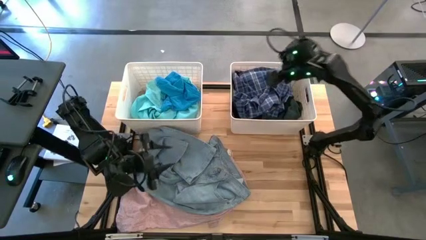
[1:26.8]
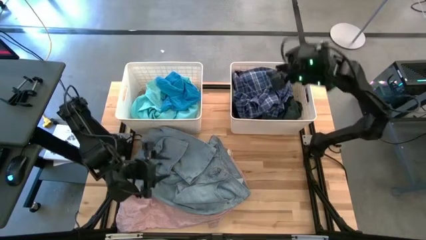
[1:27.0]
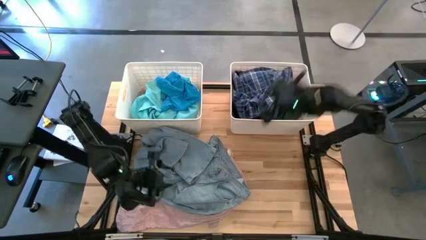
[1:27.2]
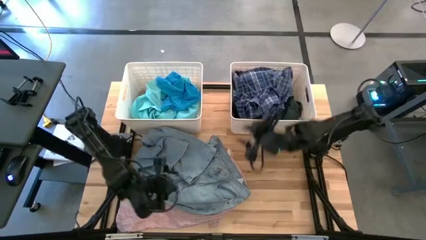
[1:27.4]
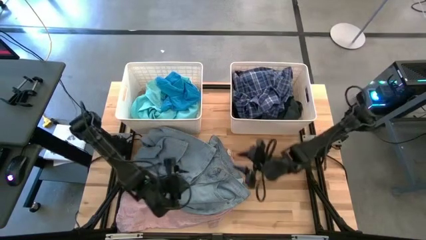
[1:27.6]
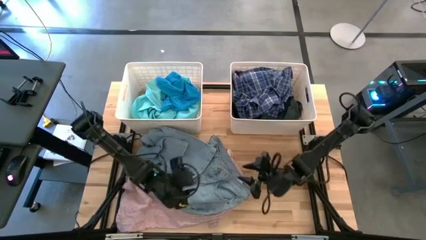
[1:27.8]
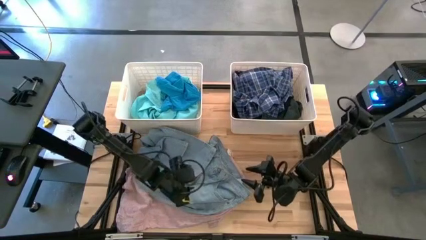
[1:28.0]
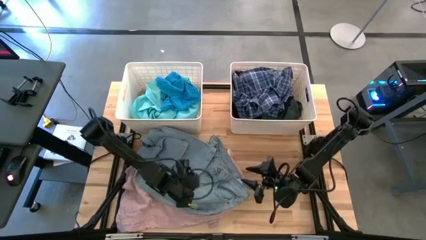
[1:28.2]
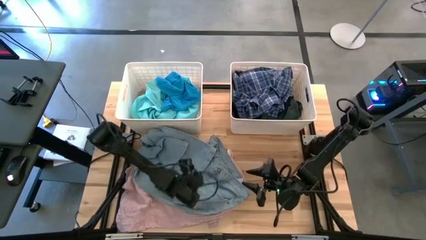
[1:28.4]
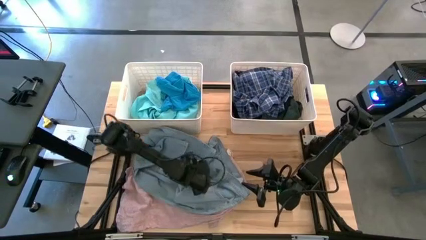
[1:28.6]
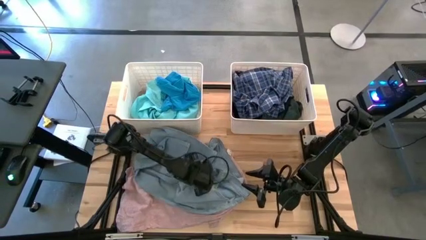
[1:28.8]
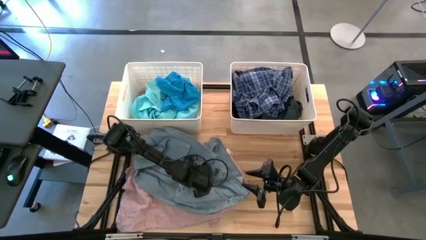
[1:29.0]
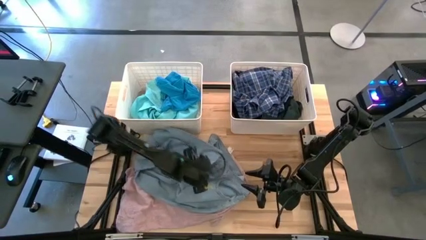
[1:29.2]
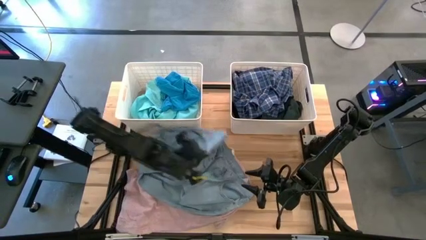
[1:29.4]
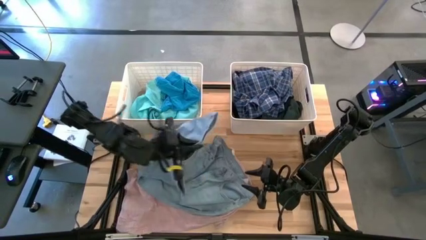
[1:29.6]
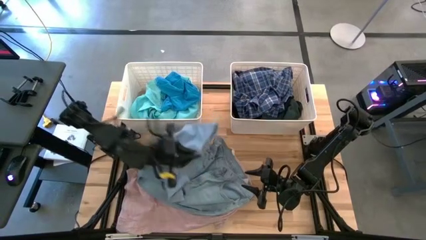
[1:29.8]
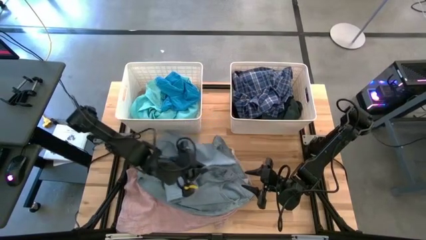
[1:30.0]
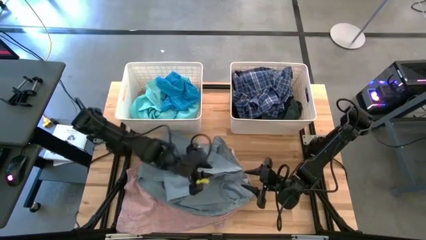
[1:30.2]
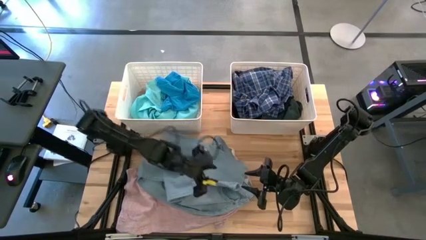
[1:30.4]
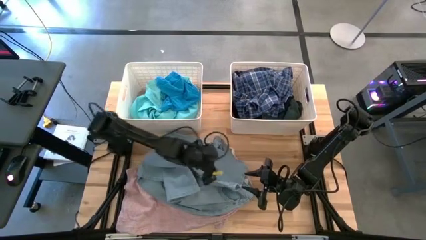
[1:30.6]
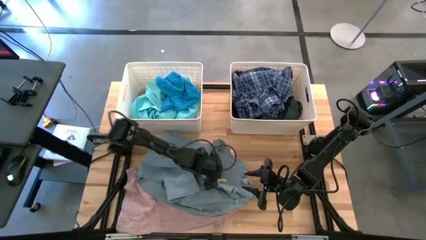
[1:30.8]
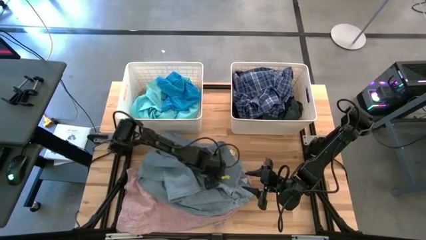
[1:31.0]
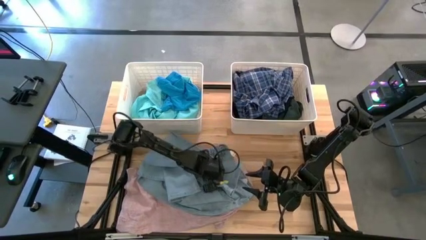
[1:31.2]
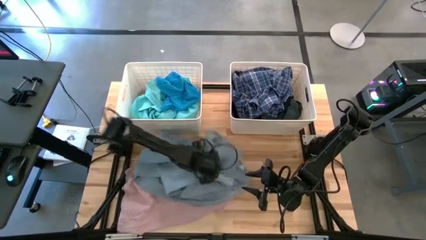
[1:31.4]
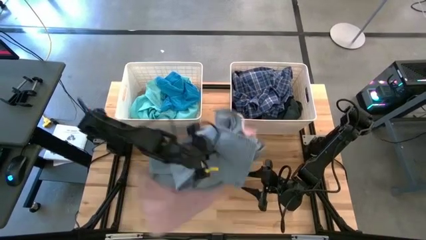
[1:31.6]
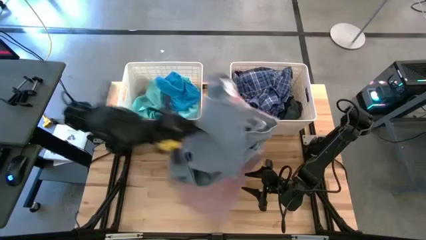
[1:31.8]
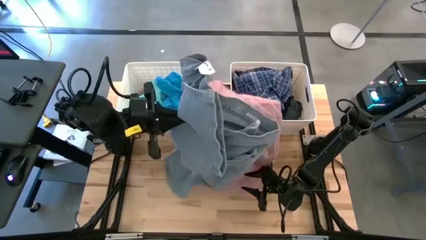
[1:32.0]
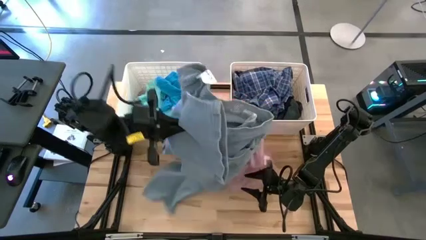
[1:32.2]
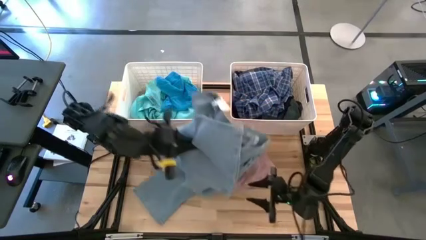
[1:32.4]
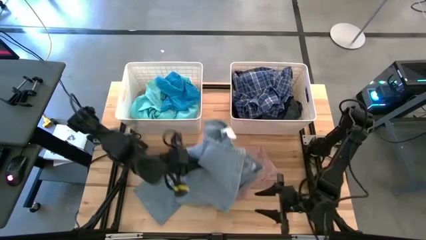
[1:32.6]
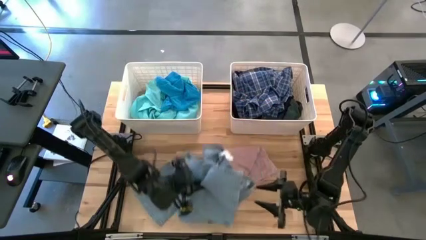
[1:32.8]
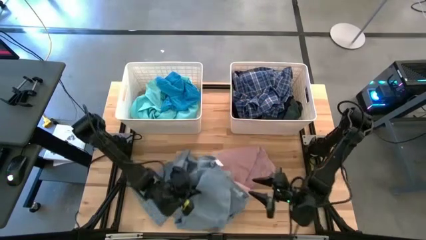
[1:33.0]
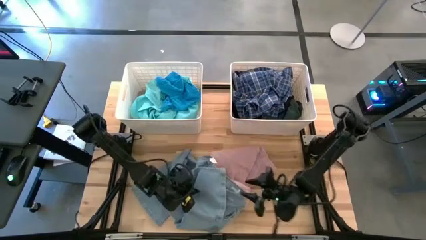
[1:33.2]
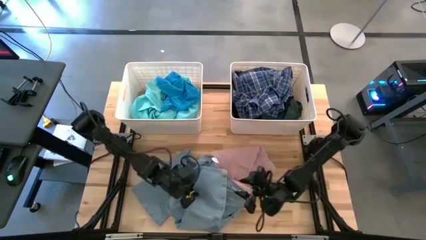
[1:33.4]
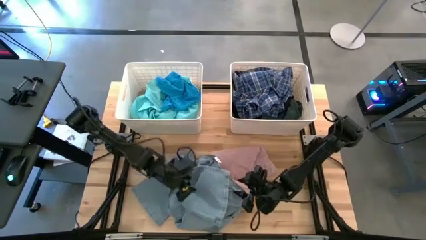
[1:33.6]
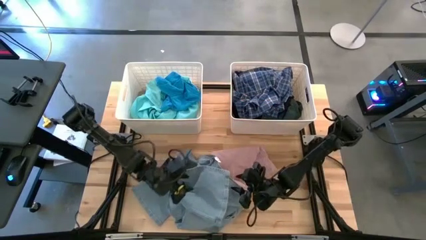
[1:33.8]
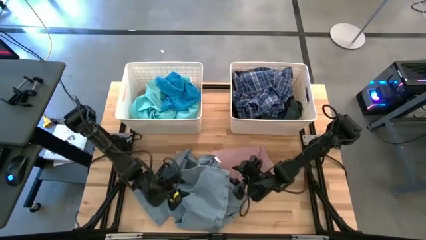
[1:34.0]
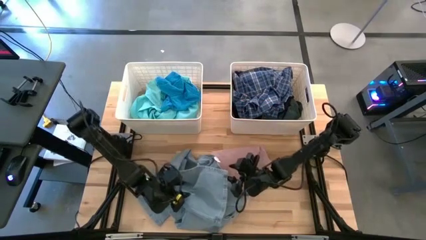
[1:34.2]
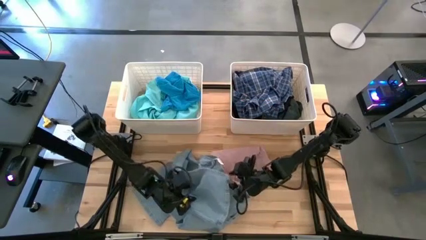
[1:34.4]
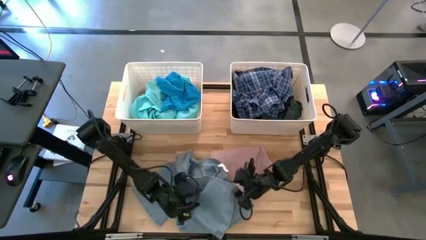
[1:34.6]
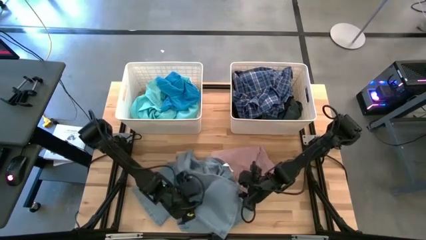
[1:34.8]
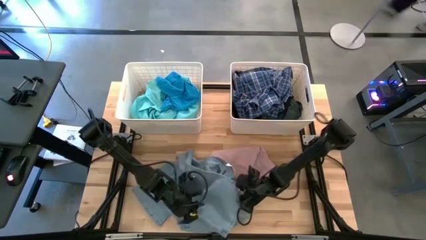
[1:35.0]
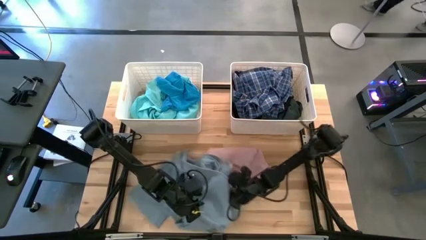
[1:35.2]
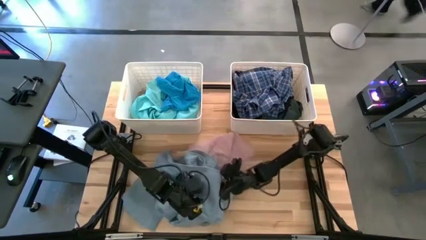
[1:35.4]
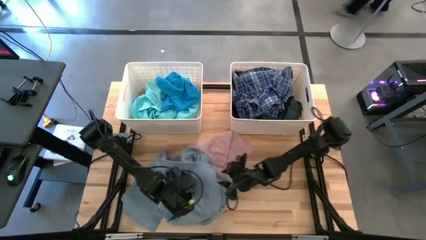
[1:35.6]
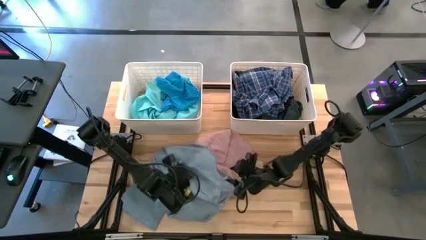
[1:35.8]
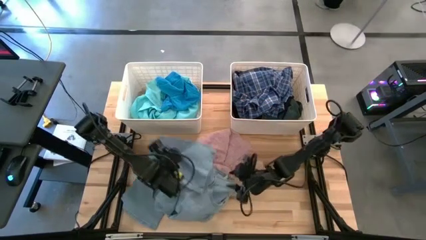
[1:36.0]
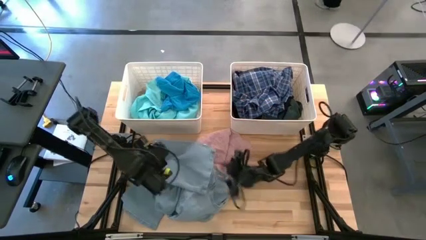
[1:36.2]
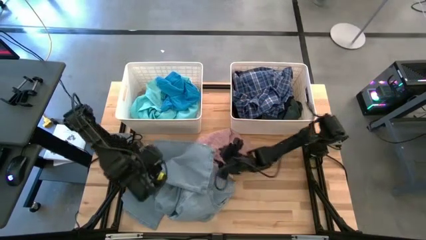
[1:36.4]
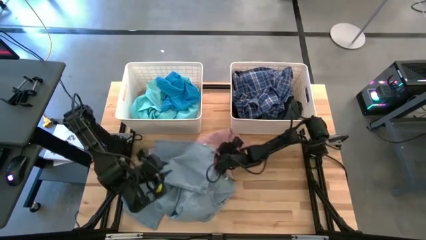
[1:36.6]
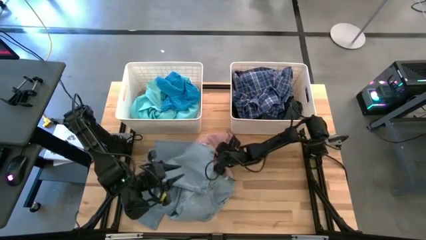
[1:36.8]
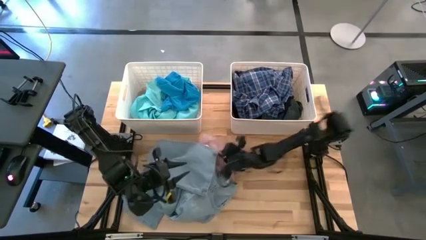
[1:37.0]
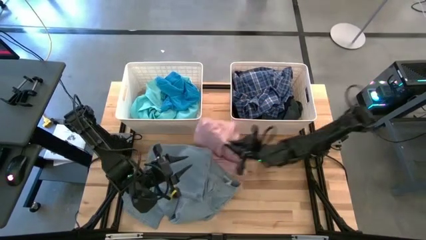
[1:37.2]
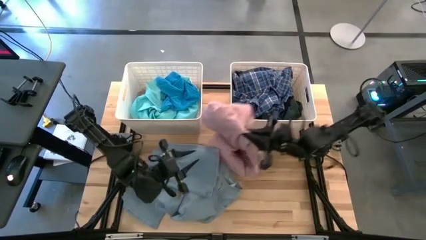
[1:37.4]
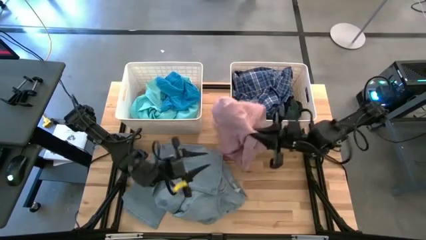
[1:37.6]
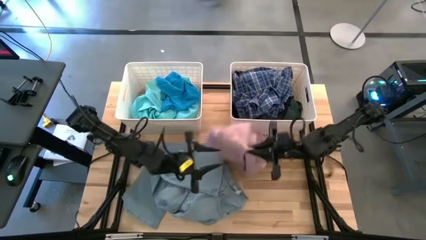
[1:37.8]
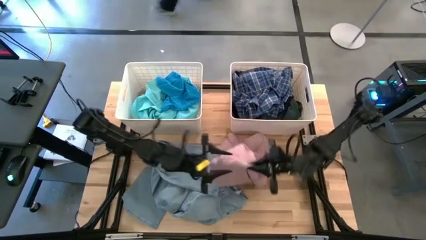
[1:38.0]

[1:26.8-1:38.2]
Task: Sort clothes
Put the pink polo shirt into the left white bin

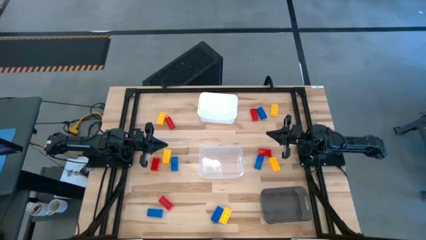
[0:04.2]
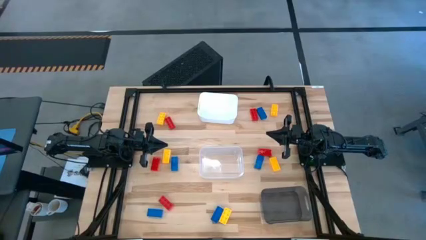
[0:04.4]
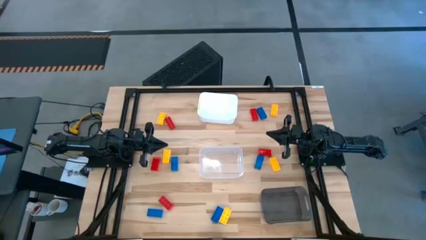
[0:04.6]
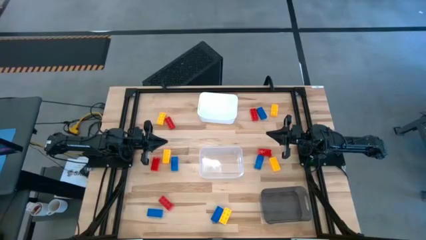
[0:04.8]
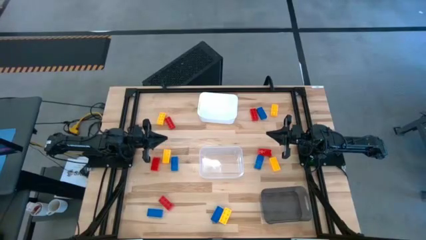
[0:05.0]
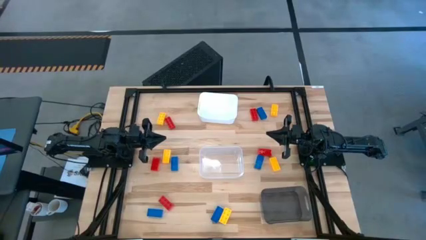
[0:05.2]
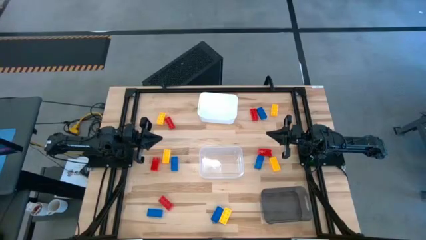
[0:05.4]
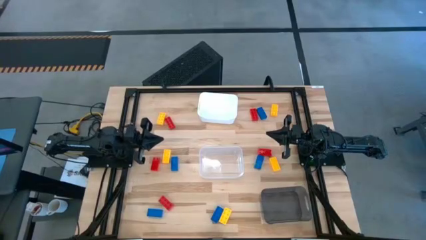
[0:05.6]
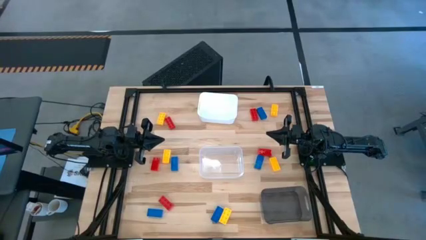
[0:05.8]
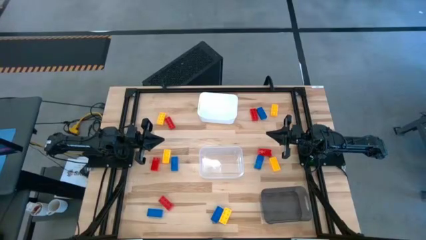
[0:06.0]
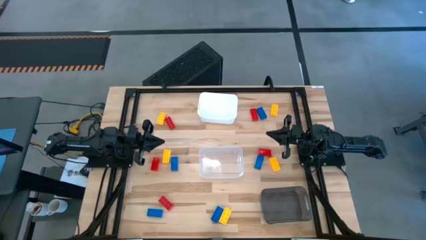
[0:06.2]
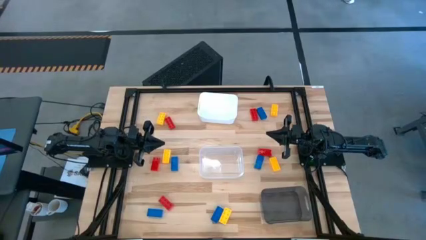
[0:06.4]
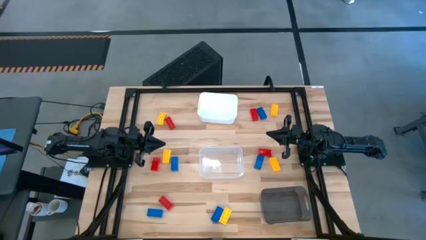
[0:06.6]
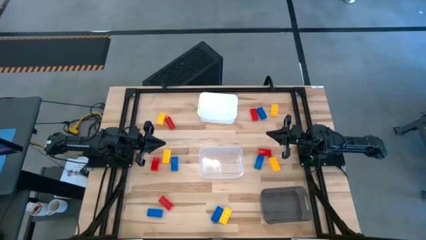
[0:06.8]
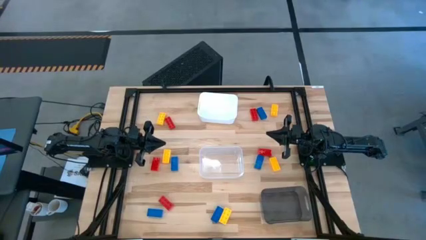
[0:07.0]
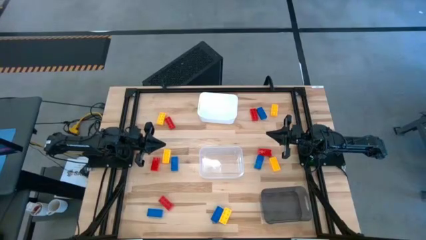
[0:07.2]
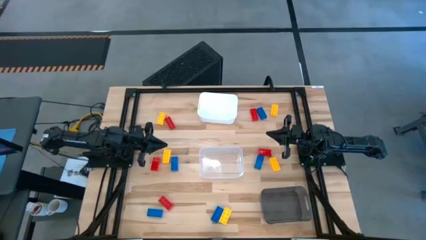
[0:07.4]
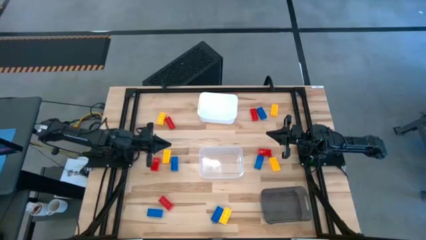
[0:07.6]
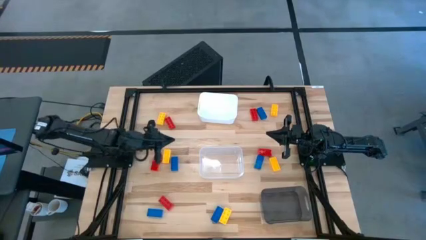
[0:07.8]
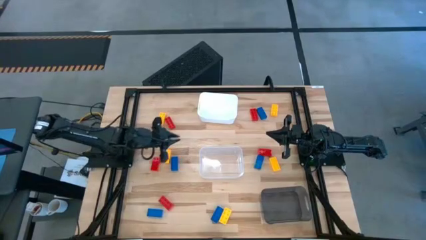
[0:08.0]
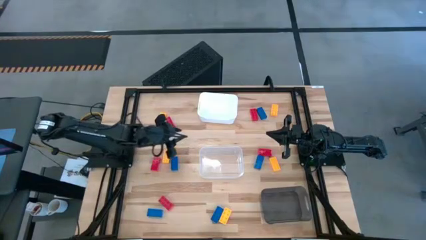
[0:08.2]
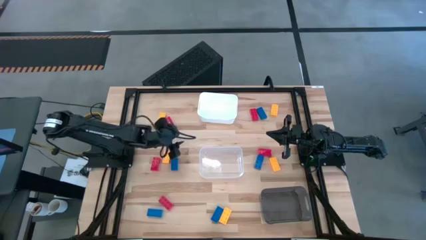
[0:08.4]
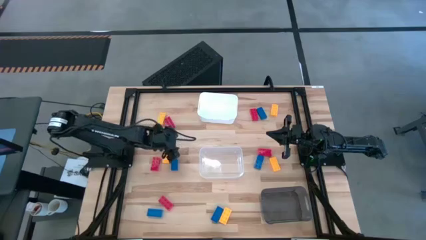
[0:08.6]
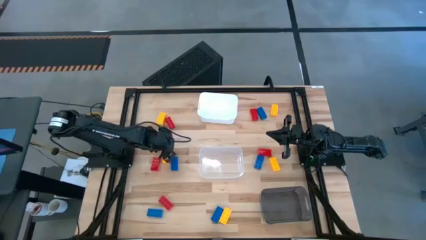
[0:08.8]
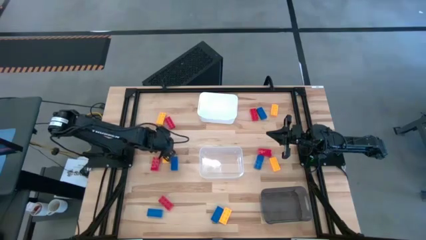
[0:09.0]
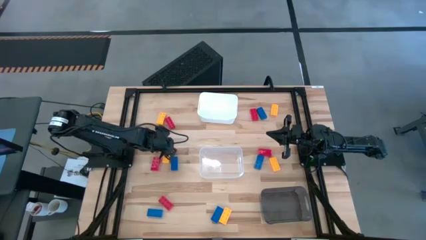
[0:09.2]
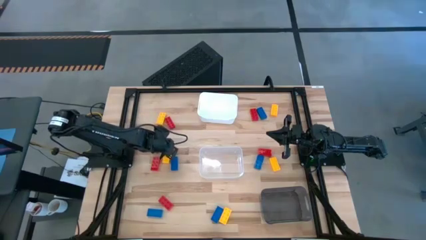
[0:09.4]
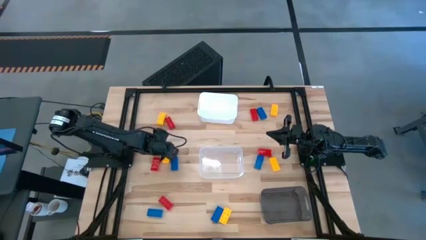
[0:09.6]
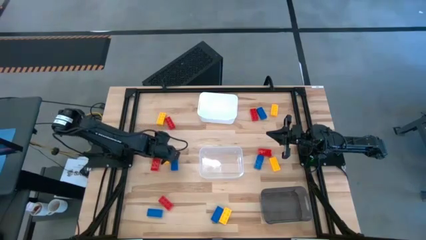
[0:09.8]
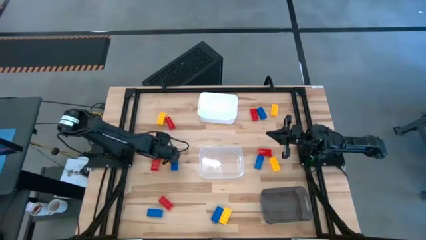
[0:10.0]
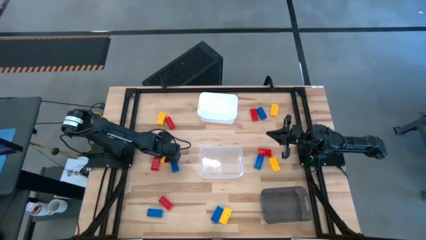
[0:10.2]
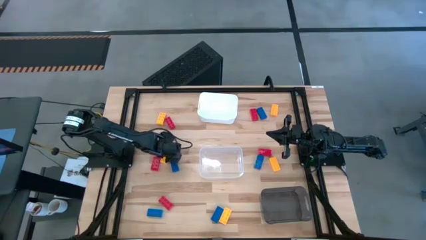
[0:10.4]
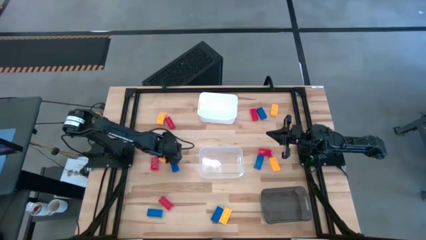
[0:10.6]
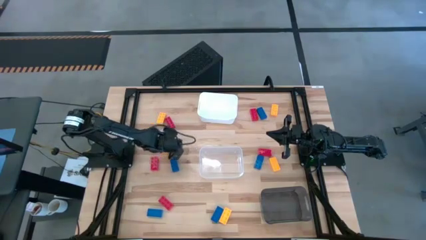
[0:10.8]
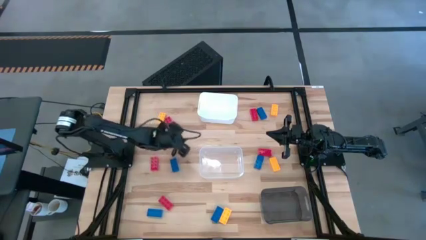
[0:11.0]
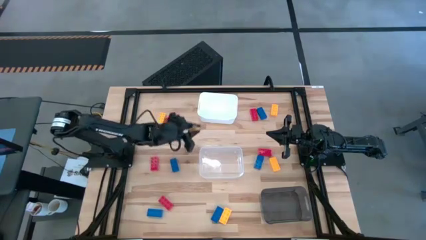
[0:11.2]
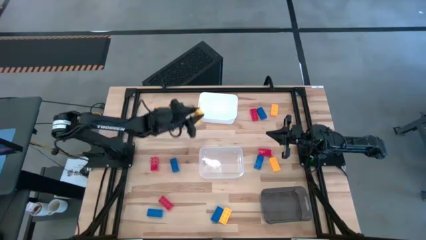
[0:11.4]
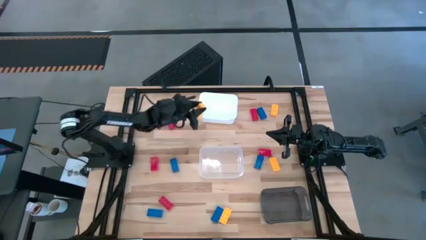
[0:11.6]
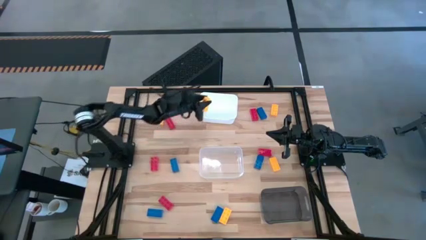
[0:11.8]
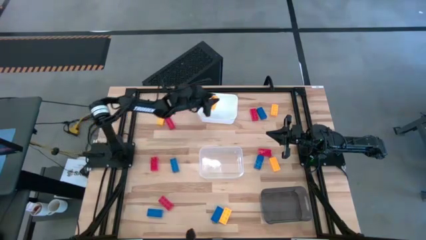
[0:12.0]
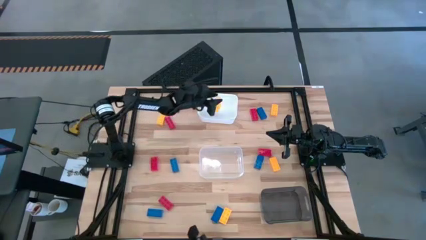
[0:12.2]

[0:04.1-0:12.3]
Task: Sort & place blocks by color
Put the yellow game piece into the white bin
